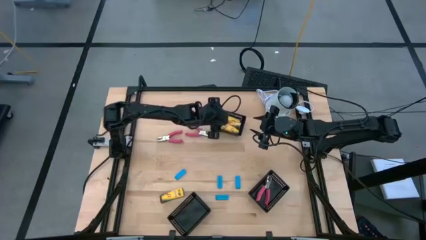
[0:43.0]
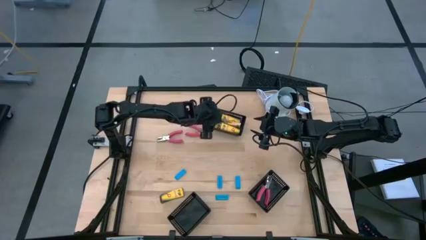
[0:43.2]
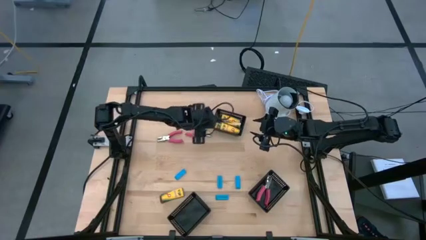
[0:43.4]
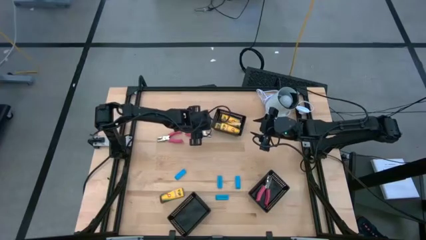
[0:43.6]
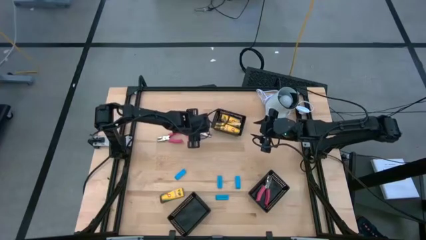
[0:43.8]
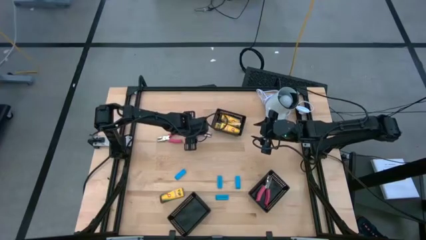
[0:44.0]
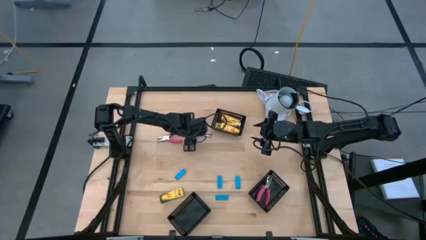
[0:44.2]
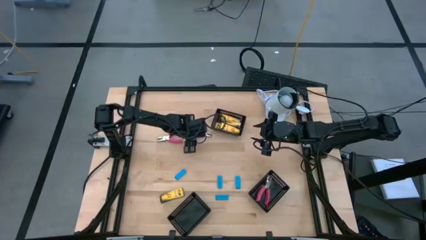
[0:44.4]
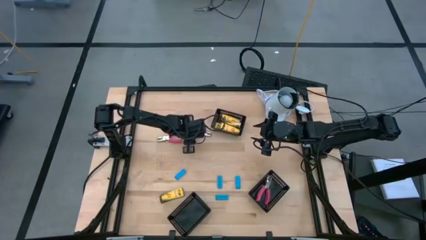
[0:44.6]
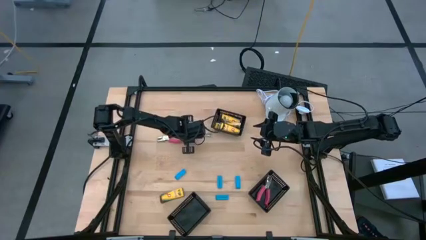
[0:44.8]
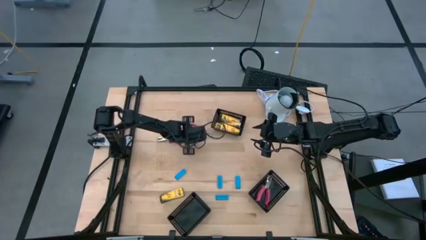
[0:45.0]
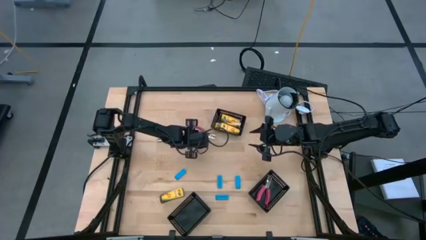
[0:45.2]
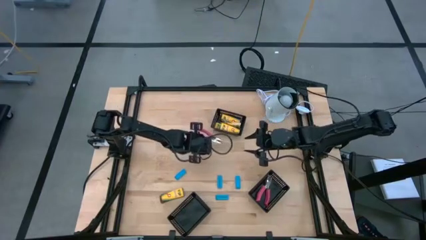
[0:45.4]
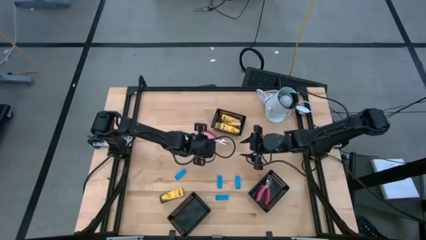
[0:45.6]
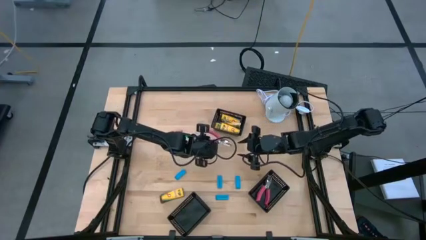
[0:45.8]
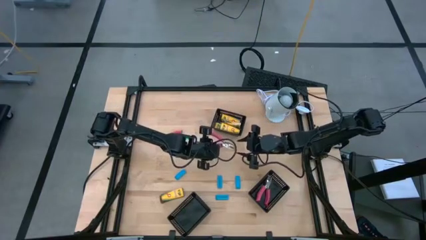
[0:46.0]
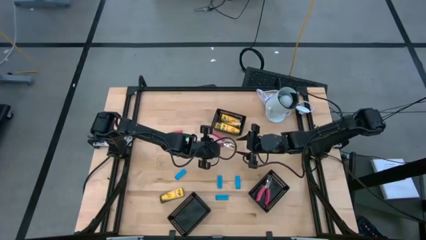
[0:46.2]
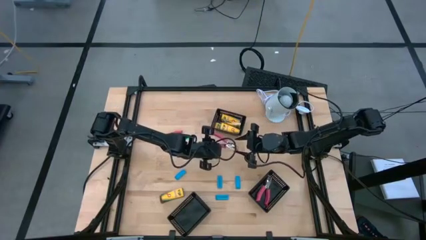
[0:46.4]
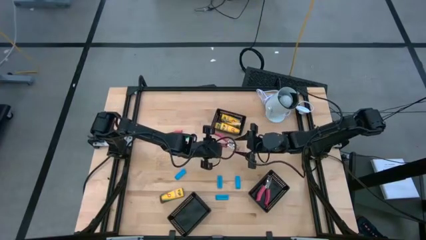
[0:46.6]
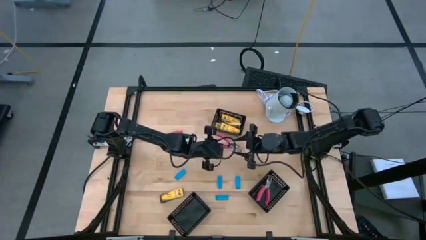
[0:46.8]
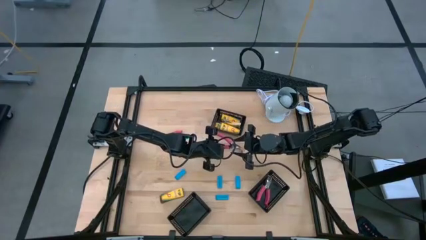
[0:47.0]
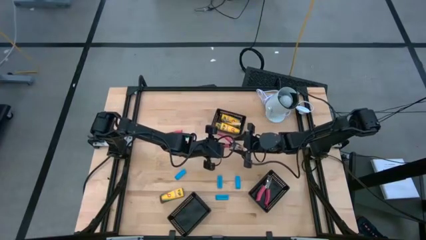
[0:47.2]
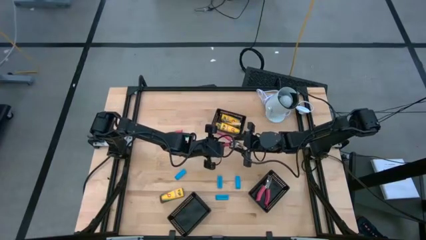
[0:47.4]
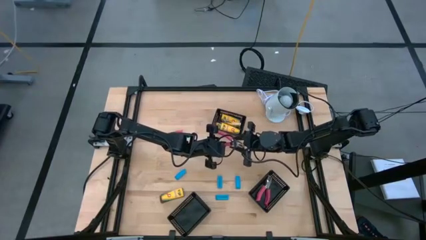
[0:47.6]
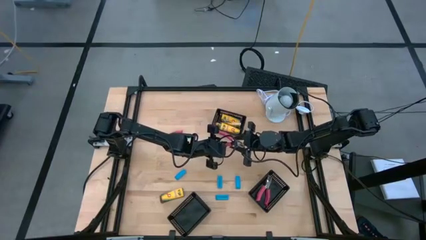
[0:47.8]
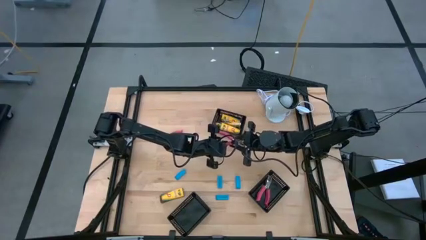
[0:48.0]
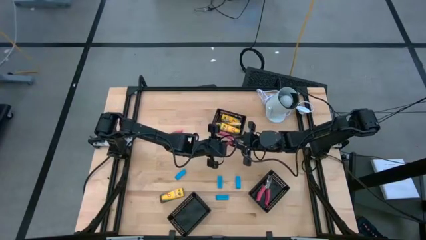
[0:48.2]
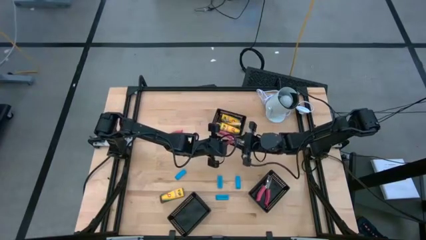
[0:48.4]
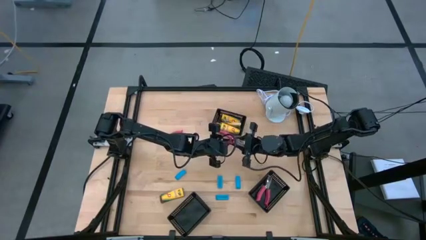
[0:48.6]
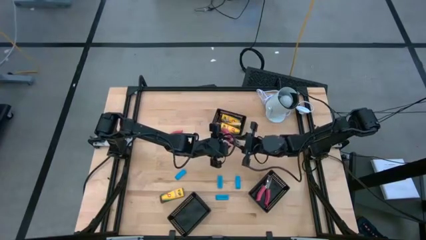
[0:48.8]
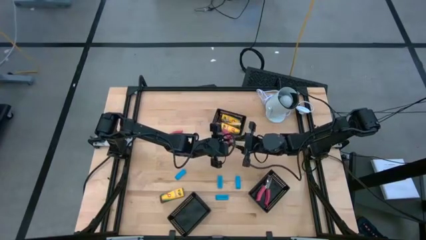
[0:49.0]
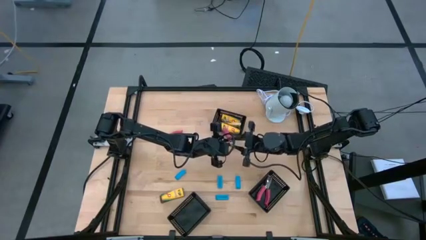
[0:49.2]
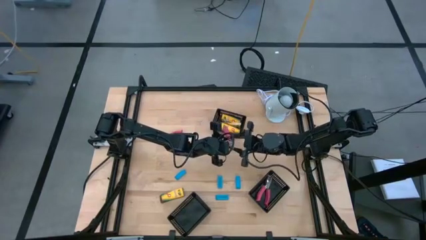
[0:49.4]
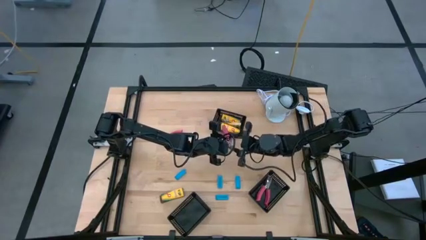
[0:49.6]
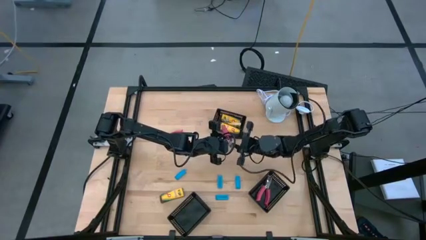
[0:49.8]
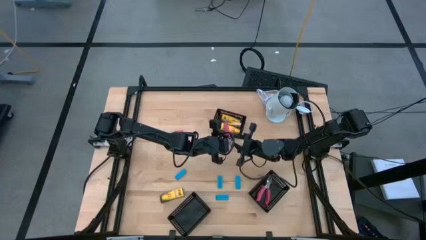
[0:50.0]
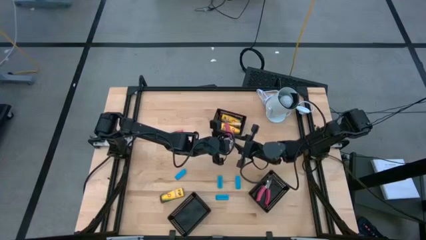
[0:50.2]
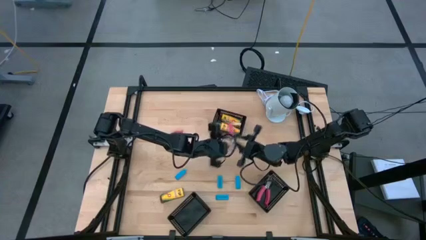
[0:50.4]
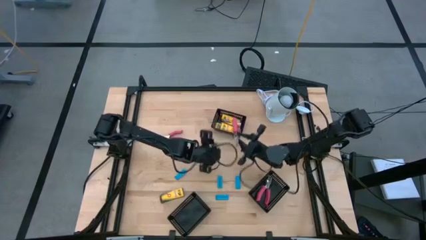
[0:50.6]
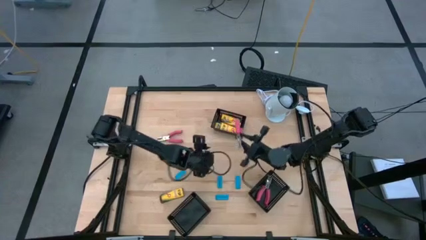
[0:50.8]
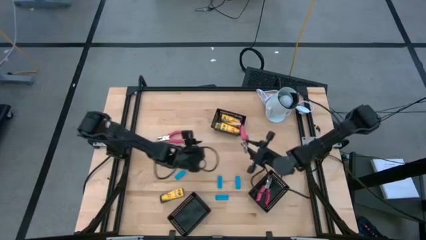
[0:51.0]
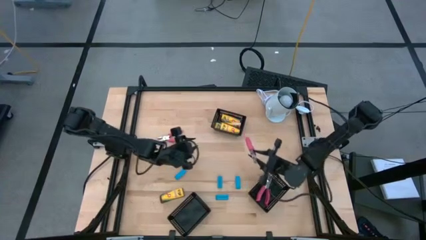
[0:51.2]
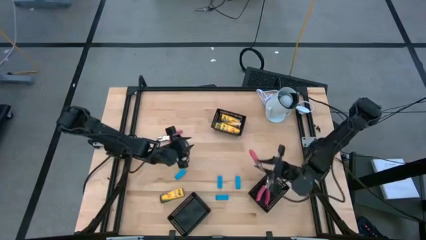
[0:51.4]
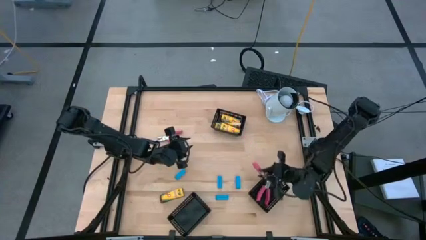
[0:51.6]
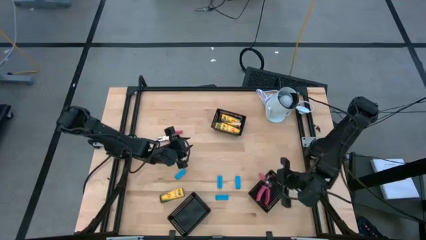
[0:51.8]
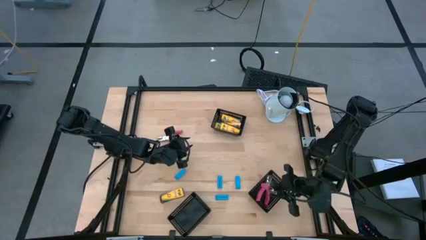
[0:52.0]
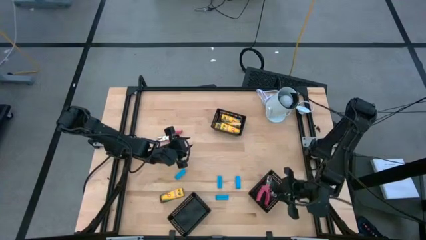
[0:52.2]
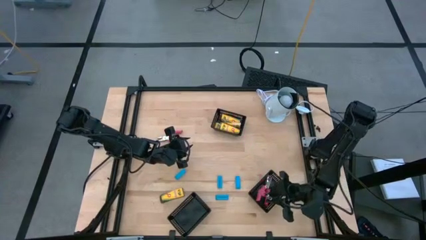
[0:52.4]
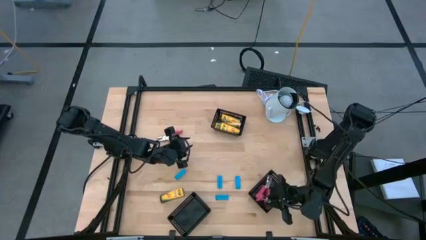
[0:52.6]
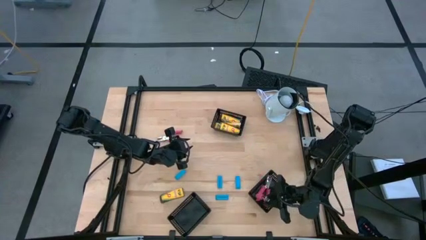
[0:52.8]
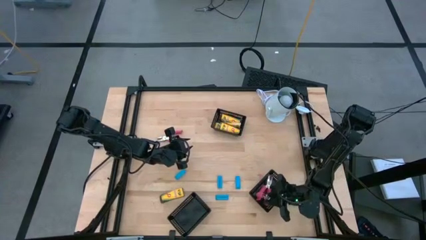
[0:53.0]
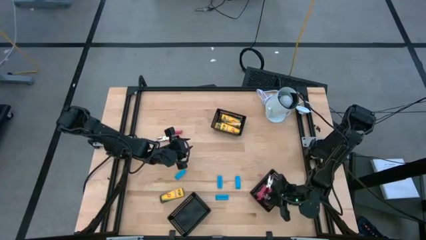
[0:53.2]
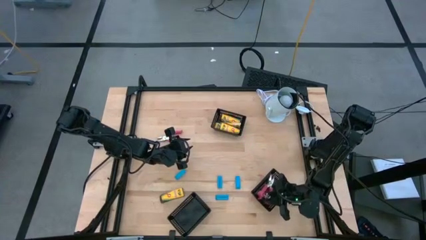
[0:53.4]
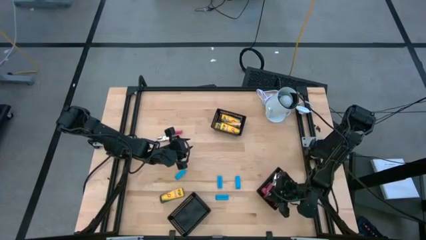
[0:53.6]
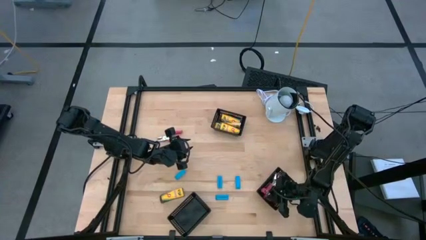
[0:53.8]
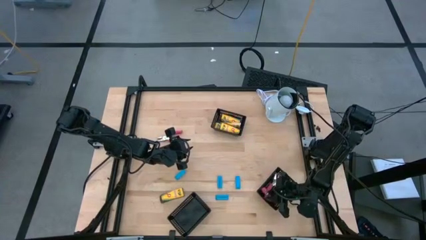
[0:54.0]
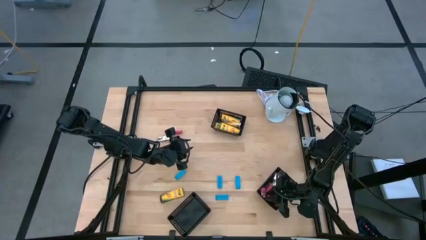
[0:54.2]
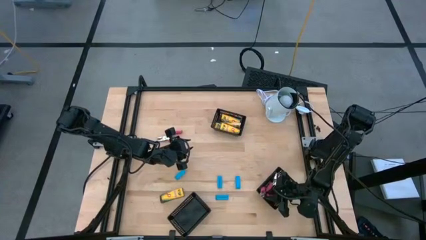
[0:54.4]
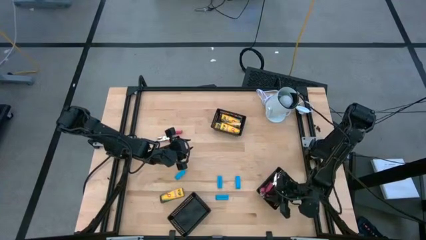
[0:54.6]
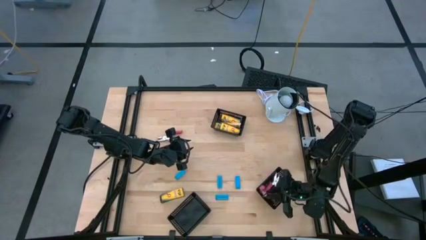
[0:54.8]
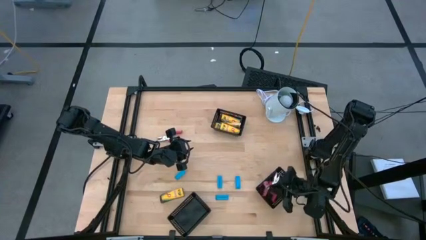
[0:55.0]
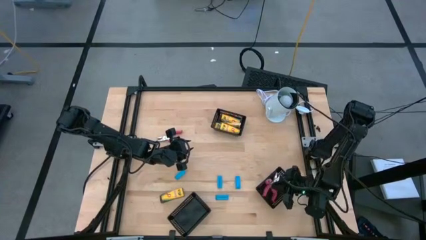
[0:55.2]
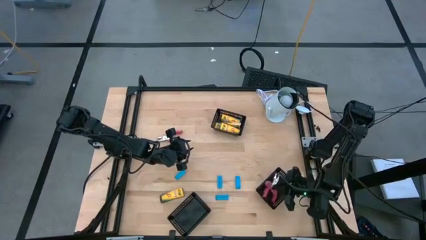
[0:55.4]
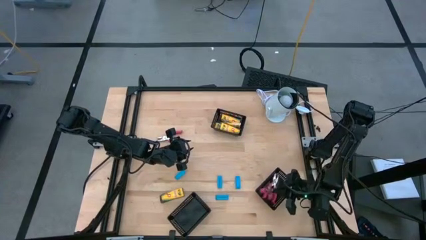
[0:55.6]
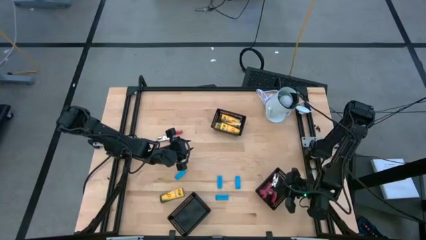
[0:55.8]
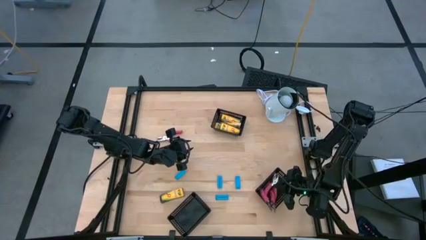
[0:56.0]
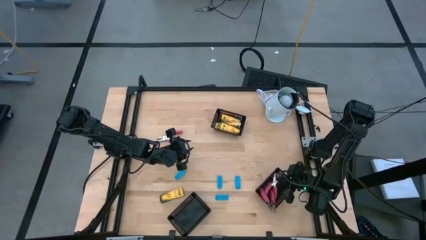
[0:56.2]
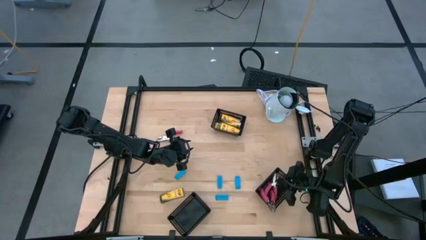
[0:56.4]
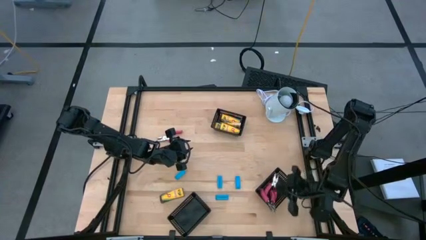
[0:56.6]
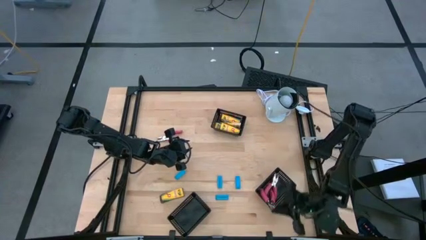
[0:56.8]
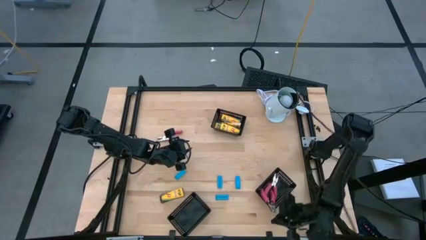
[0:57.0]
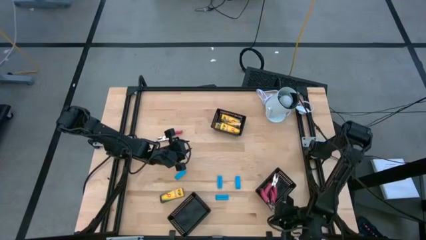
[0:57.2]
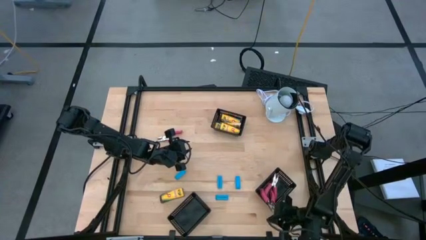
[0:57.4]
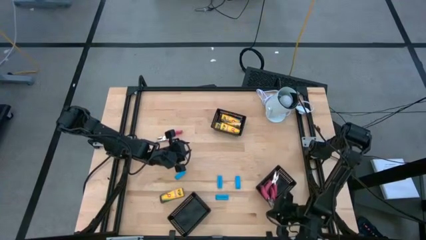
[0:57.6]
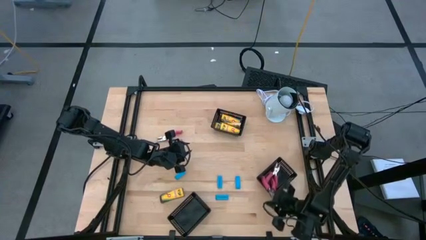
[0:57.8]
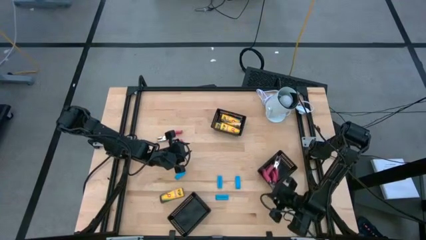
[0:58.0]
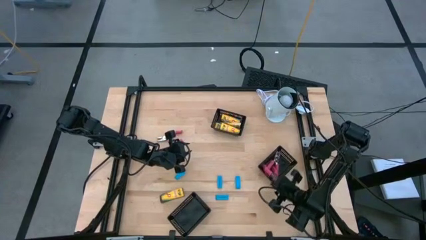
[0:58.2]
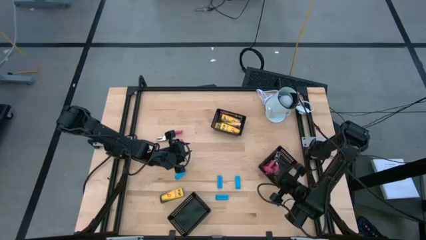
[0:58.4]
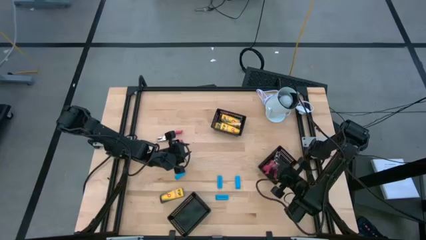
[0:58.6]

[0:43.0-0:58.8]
Task: Pick & Place School Supplies
Put the pink hole puncher into the bottom right black bin

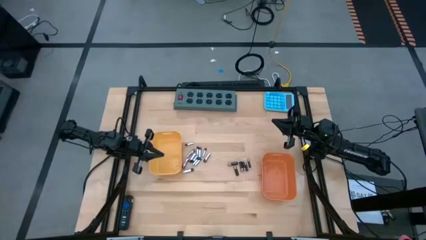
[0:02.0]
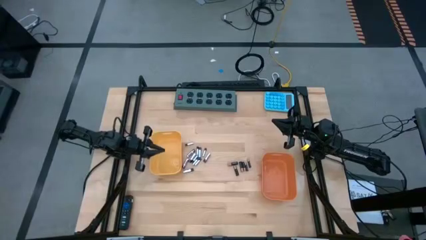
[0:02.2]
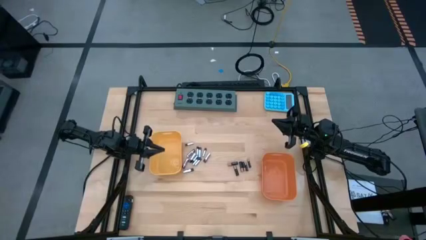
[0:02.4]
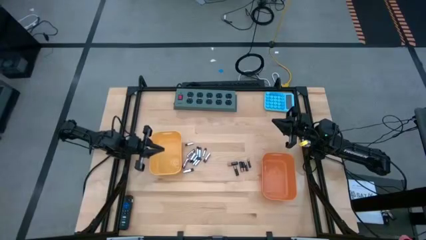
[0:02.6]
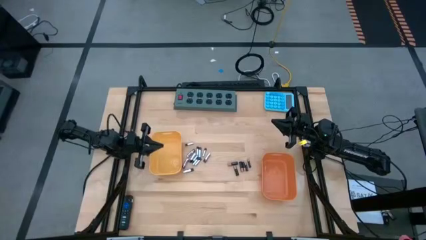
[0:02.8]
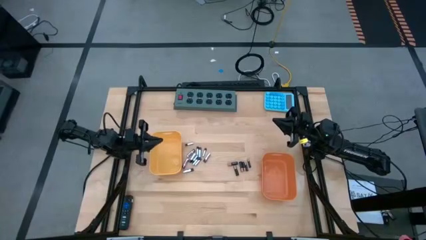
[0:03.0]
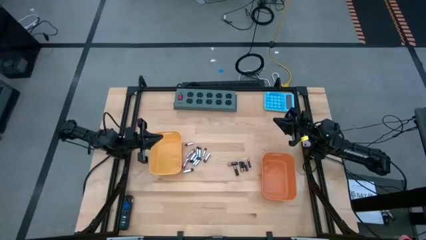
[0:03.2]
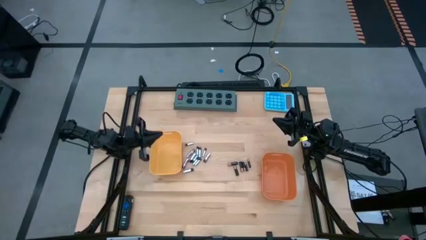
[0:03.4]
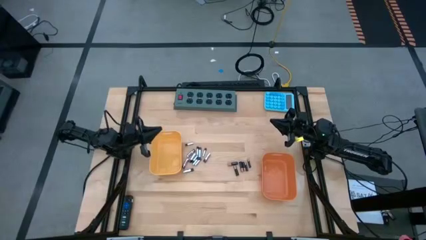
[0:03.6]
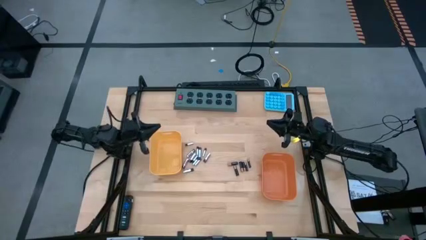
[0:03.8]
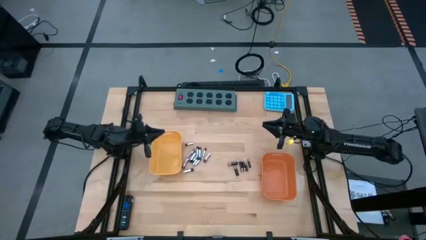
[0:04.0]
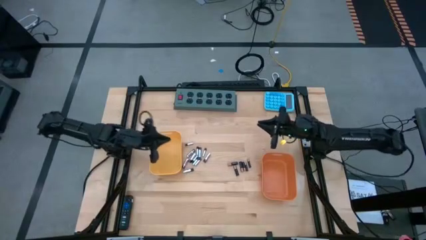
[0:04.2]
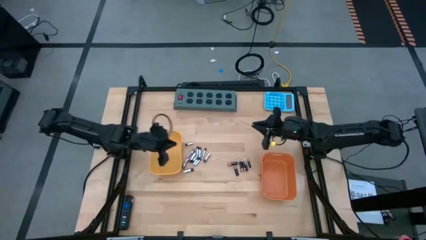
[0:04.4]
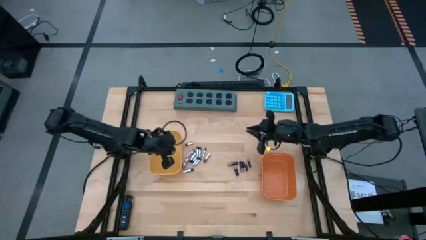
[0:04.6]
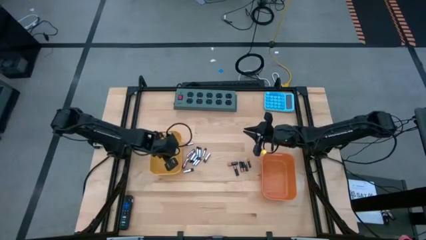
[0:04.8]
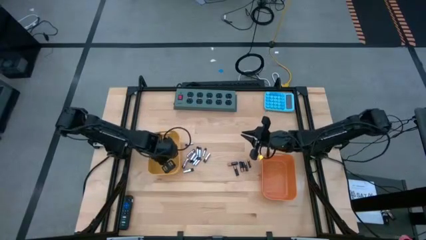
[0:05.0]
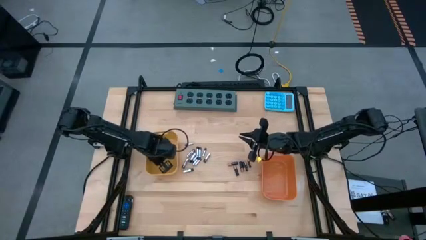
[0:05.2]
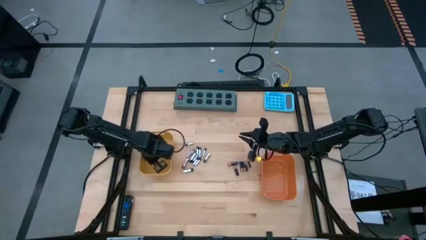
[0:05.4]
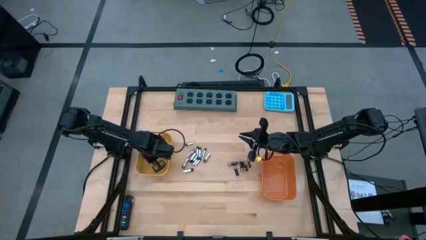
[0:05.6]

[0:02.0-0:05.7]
Task: Sort batteries
Adjust the yellow bin
